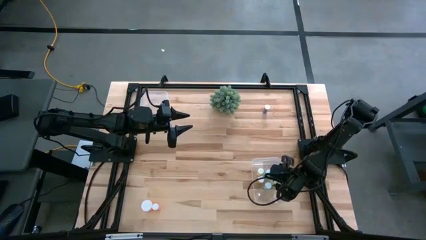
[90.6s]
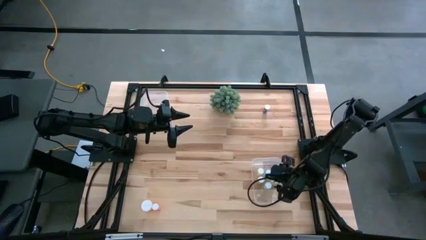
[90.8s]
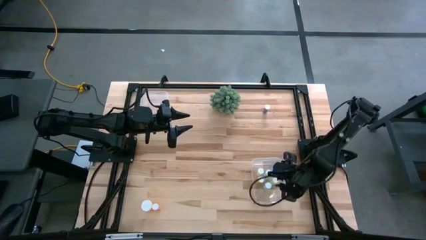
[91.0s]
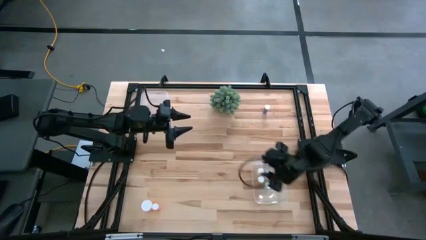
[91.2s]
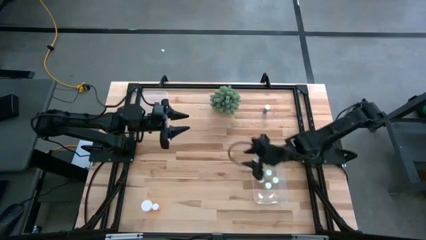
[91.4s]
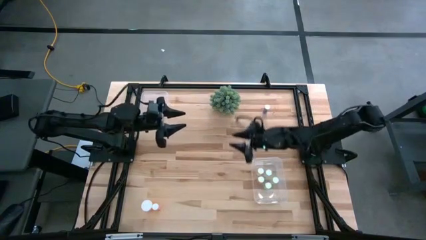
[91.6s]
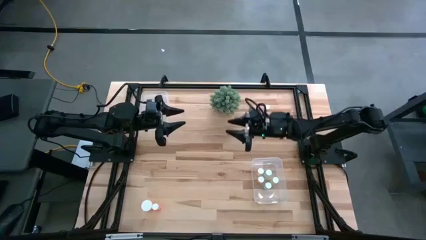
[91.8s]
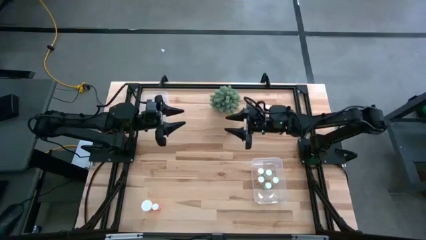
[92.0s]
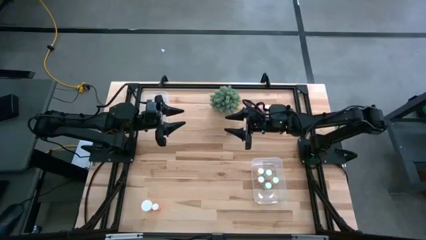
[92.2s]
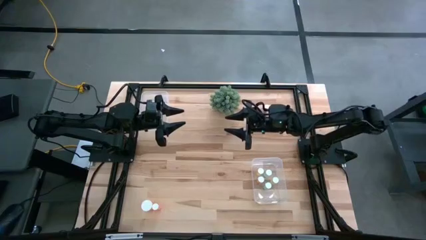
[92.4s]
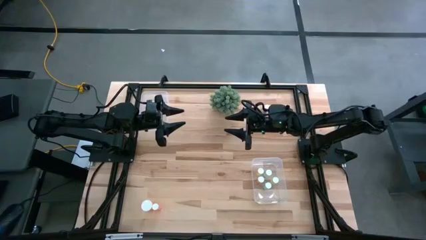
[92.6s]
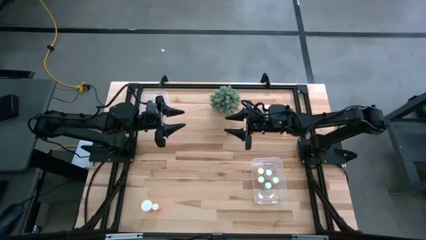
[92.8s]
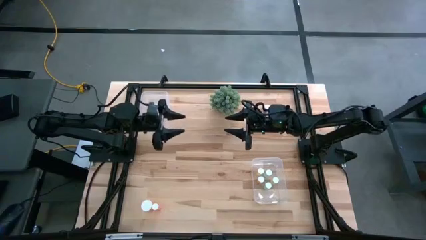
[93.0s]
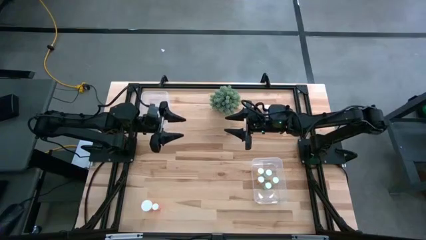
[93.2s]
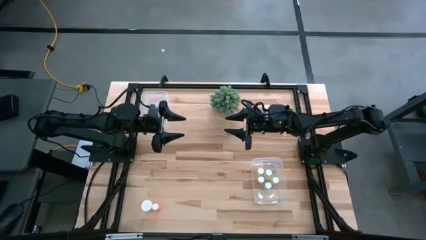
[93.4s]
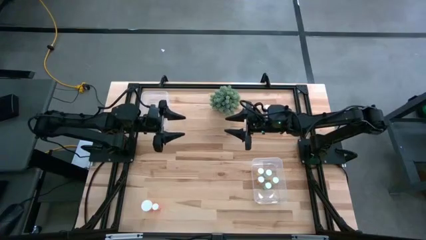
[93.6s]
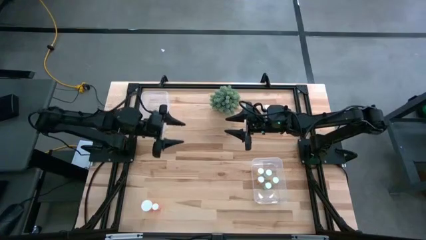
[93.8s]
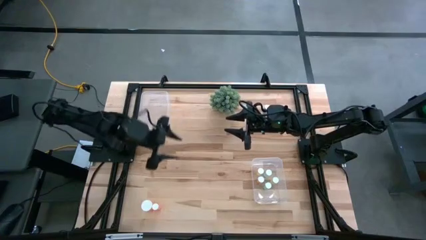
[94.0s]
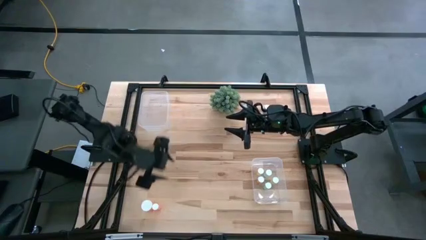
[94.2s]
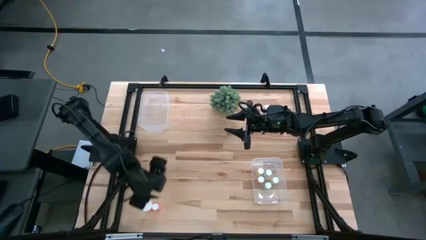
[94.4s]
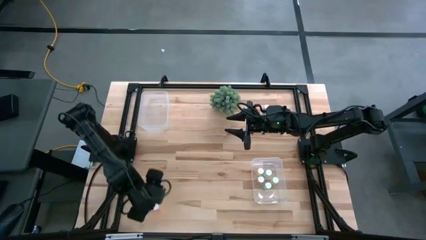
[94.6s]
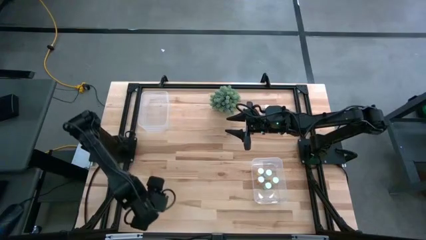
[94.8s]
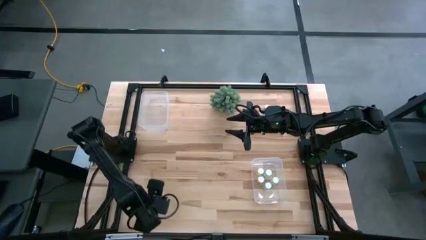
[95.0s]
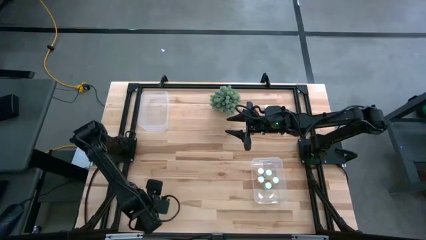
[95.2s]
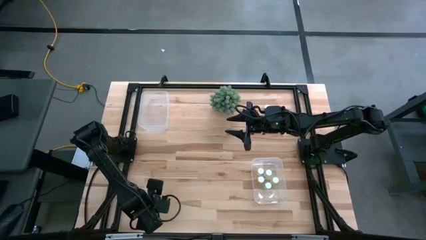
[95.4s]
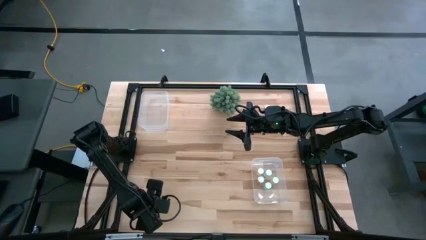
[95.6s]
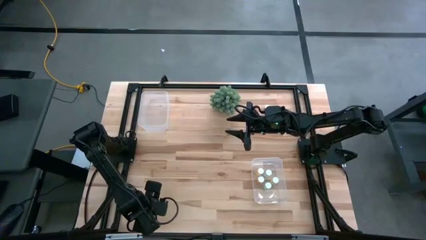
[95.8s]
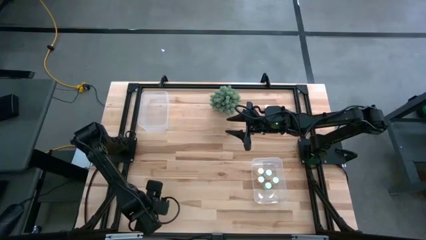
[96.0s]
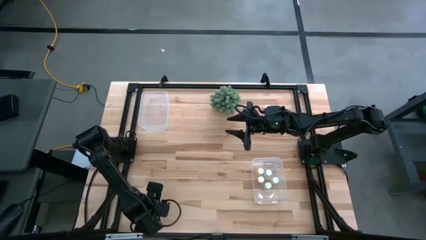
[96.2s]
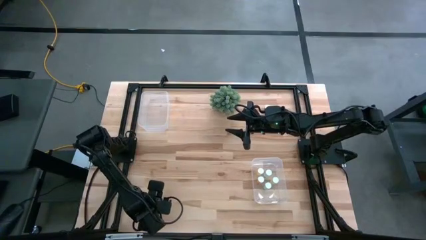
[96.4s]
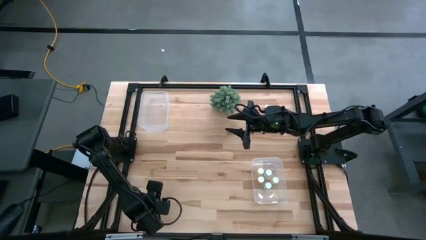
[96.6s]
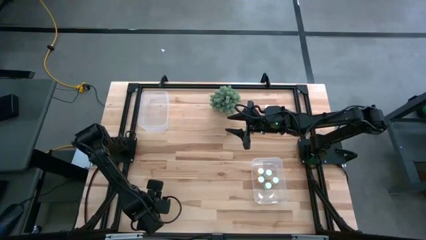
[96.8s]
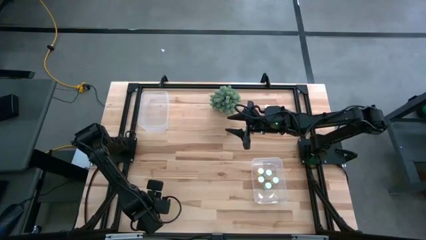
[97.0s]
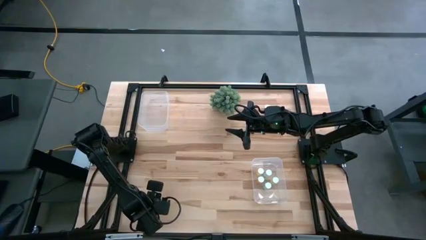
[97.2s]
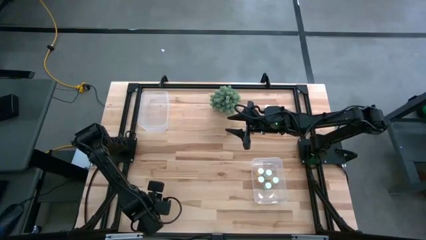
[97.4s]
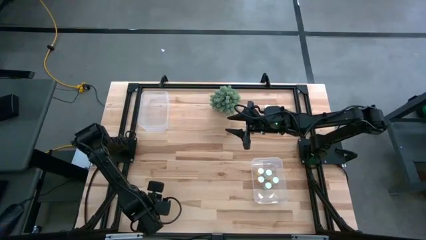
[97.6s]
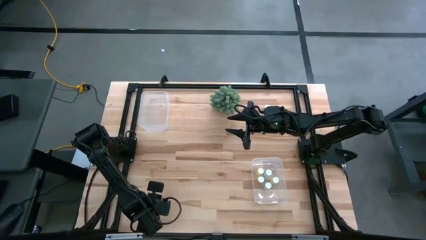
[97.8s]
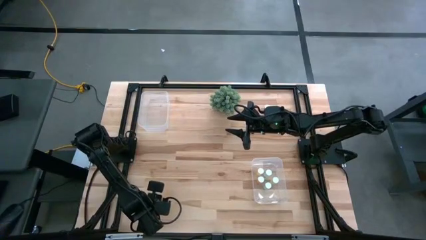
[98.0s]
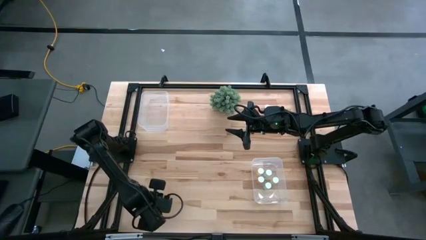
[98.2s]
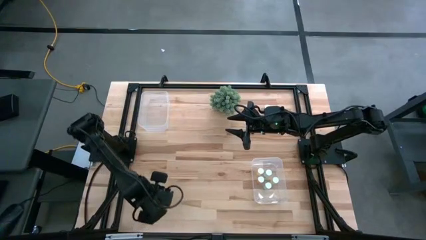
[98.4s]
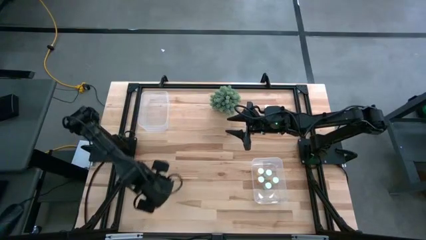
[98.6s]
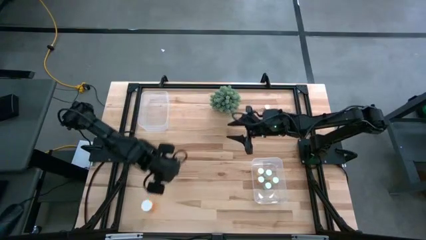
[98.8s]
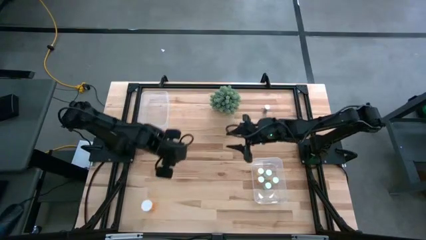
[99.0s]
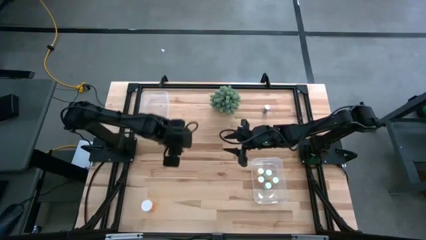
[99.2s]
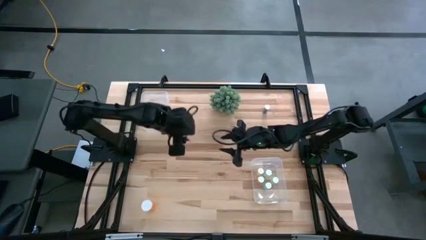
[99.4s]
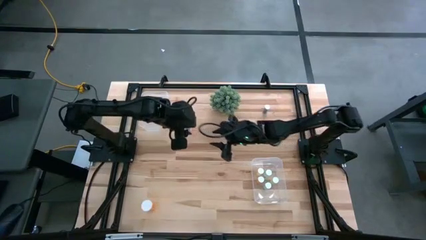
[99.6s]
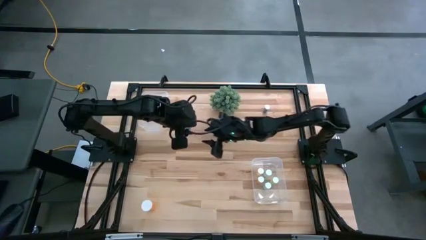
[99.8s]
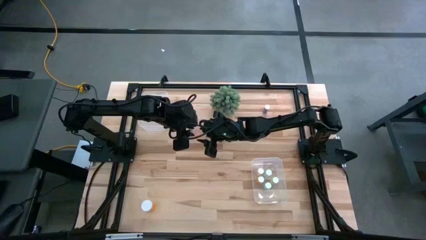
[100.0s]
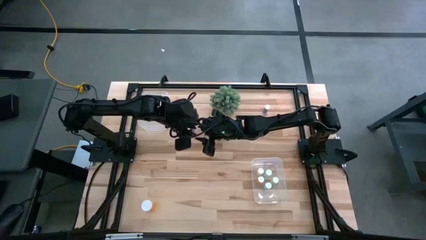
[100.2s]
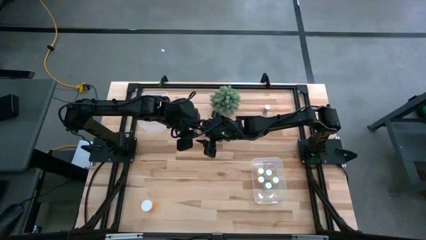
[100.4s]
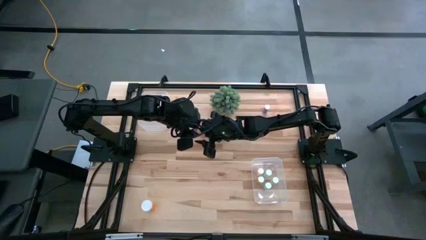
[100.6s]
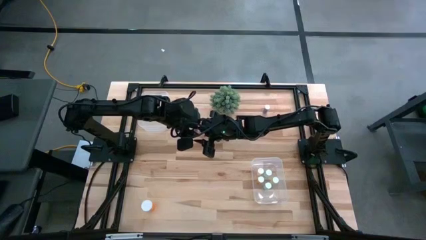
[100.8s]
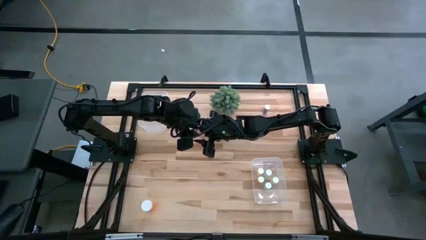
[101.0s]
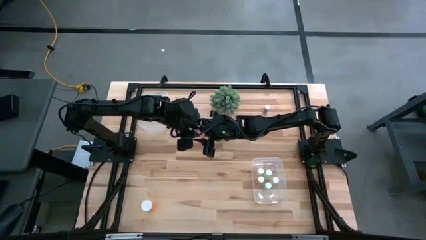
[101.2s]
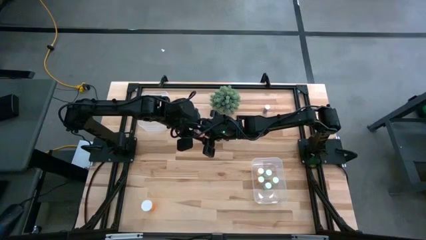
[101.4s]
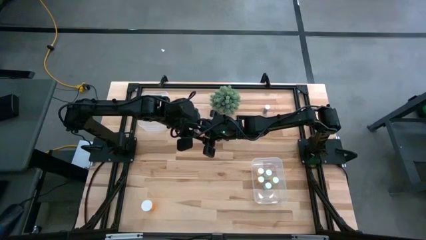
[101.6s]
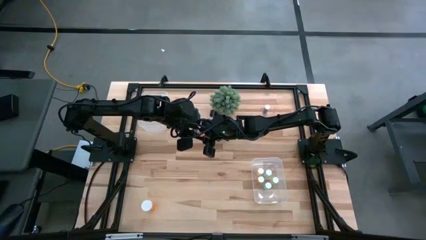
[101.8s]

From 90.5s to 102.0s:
Task: Pick and place medicine bottles into bin by pill shape (circle, oval)
Put the pink tablet bottle into the right transparent bin

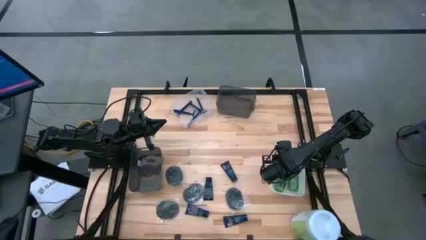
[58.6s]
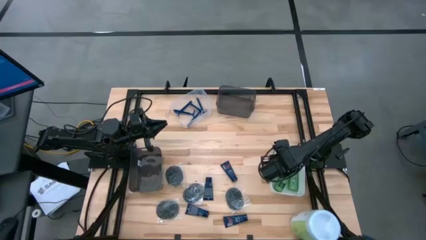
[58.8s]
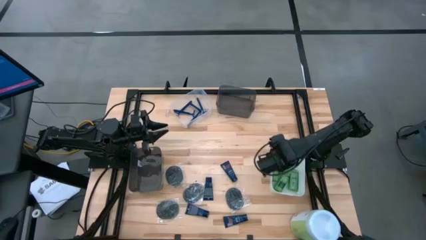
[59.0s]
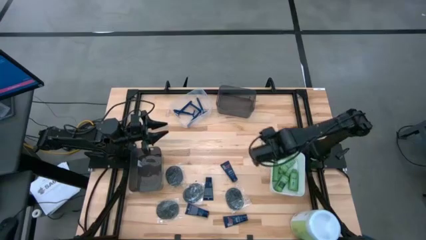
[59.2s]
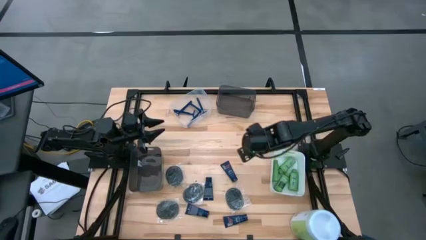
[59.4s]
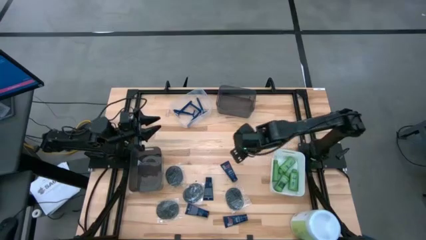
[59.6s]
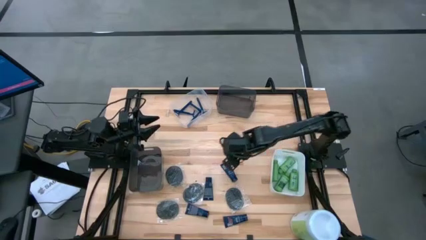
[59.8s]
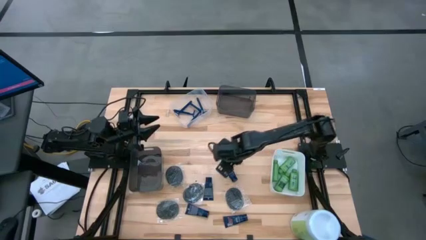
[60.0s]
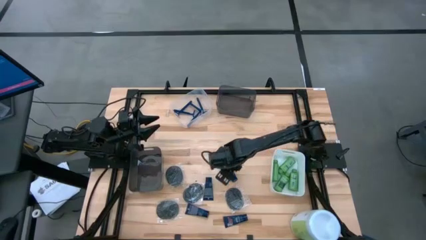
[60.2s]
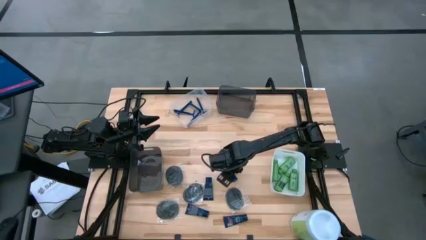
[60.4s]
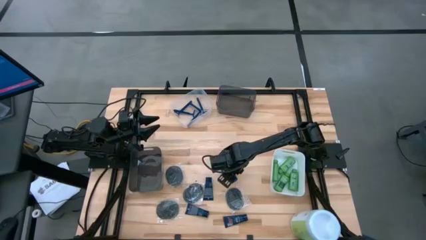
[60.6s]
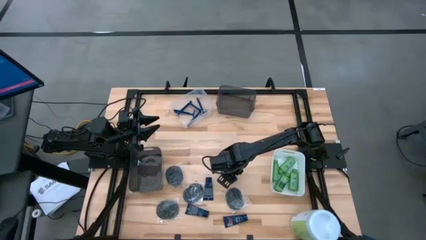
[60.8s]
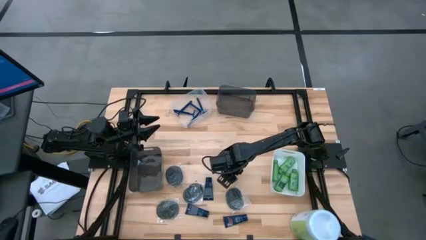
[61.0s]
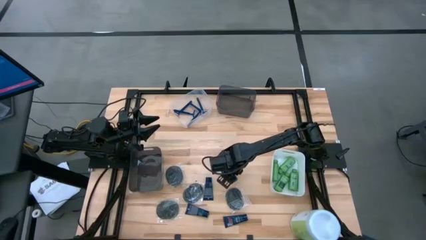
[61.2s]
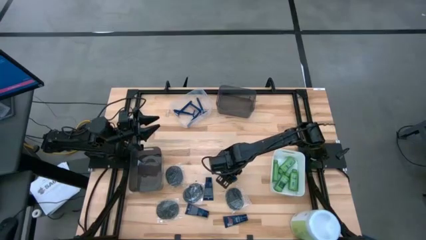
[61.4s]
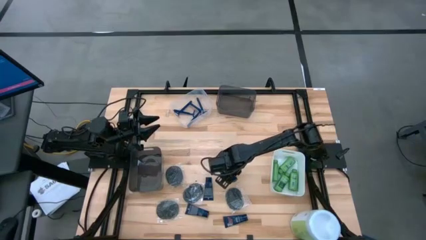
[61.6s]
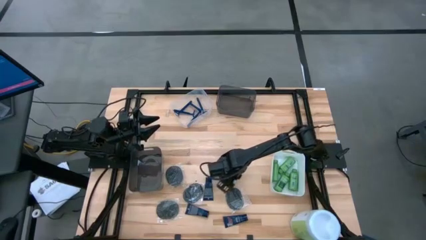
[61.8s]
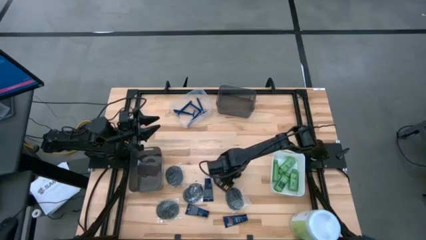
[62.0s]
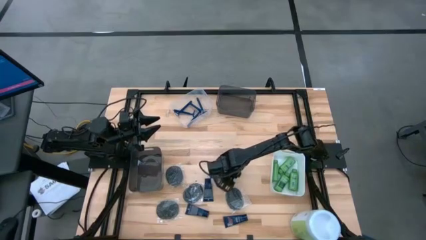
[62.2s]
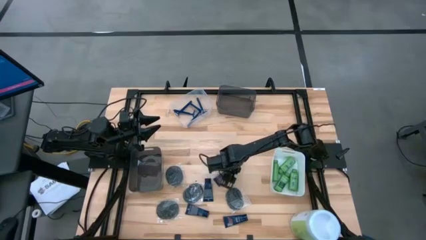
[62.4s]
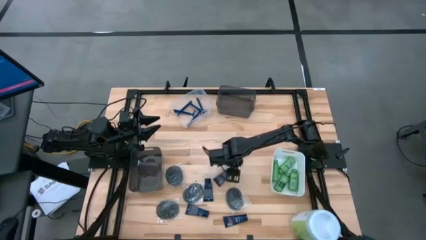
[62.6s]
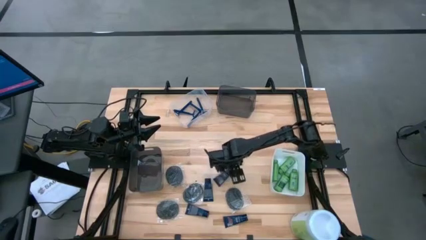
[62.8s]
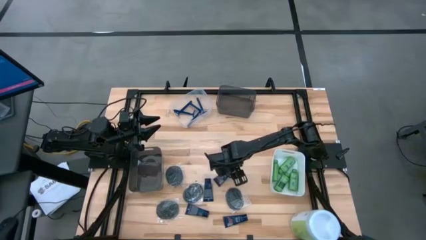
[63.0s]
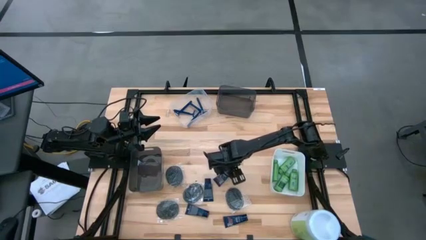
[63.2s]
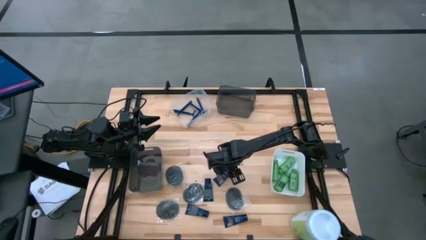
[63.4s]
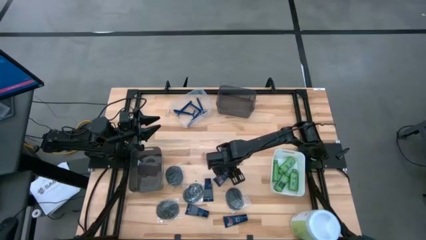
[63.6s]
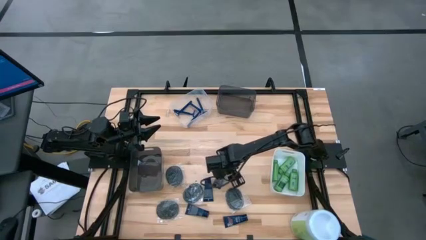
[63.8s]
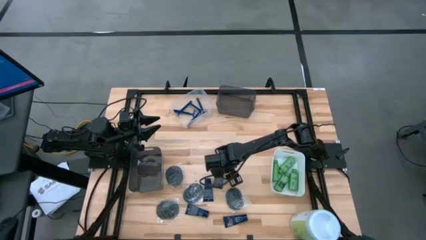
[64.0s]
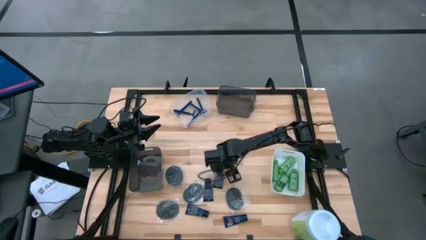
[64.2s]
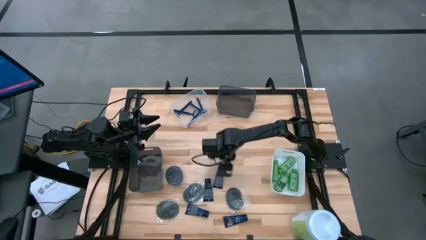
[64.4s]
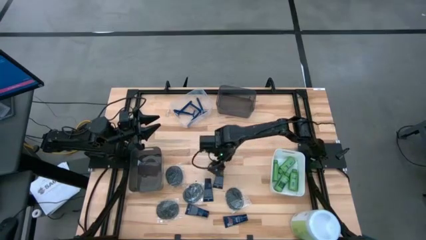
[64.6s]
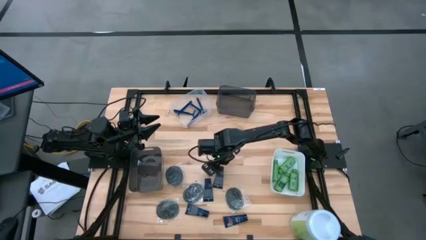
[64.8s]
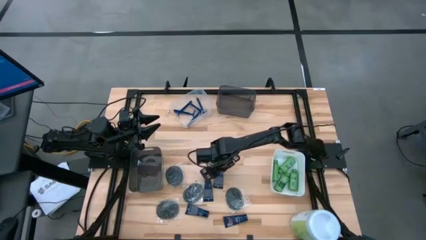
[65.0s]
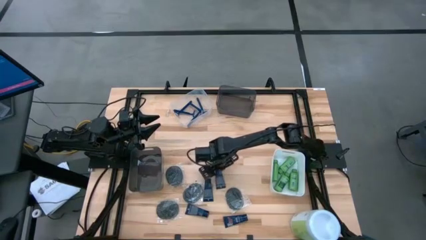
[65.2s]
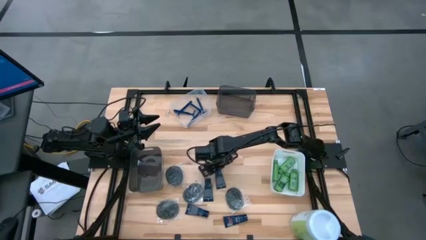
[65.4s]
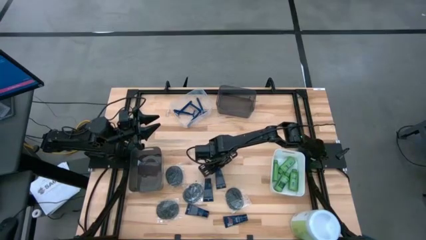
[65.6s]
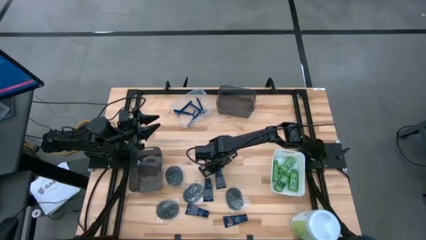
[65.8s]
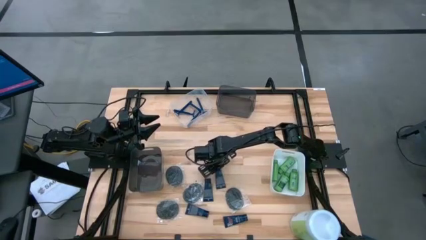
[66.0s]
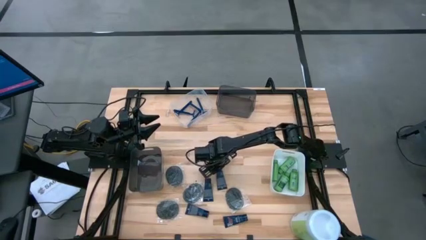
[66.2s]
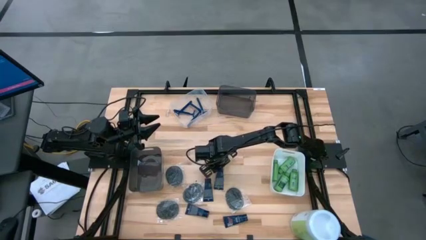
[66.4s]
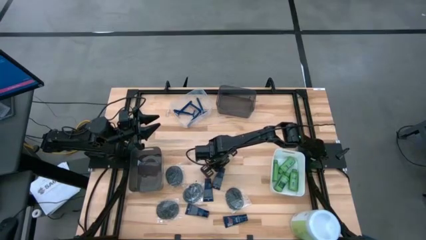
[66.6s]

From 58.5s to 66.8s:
Task: Pick & Place Travel size toiletries
Put the blue shave cream into the top black bin
